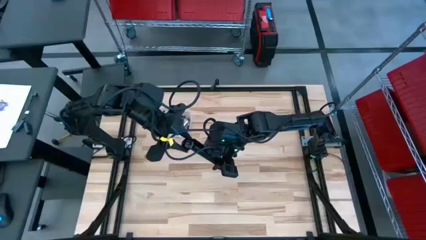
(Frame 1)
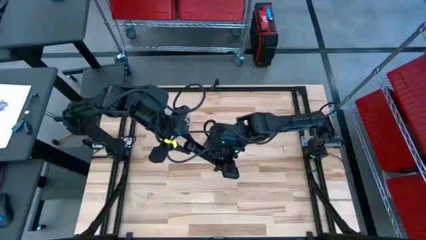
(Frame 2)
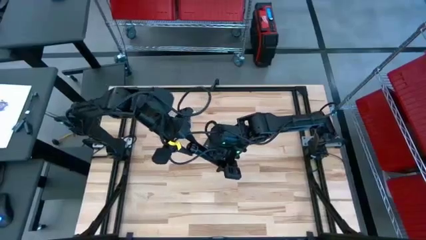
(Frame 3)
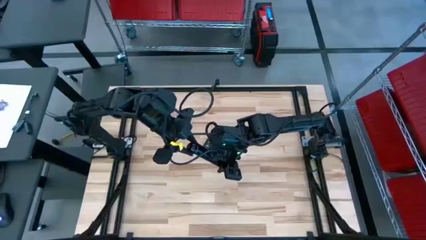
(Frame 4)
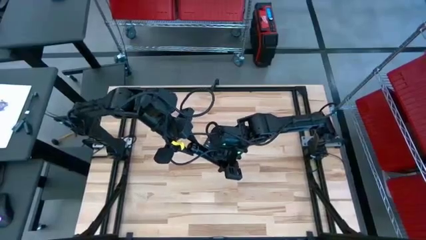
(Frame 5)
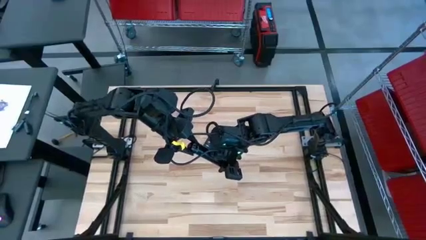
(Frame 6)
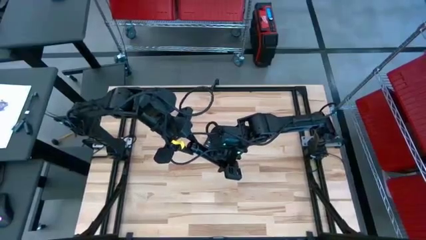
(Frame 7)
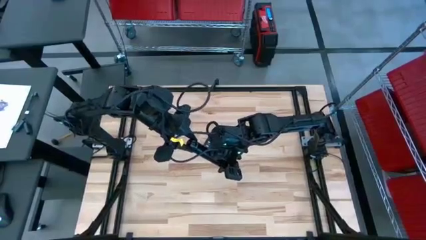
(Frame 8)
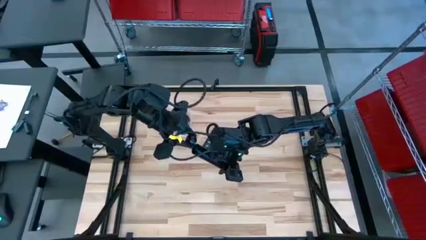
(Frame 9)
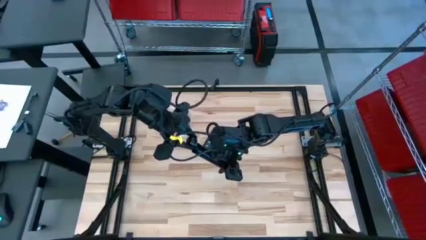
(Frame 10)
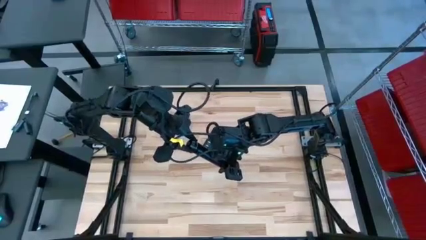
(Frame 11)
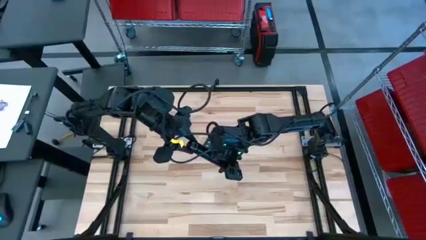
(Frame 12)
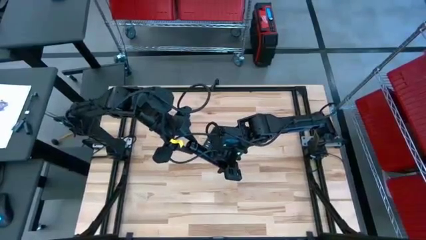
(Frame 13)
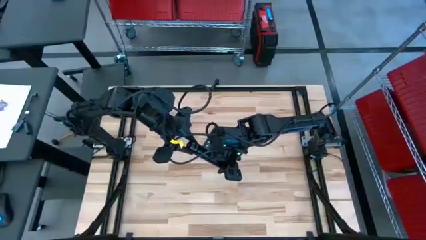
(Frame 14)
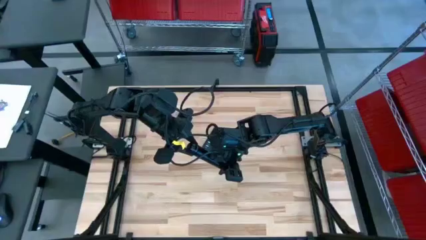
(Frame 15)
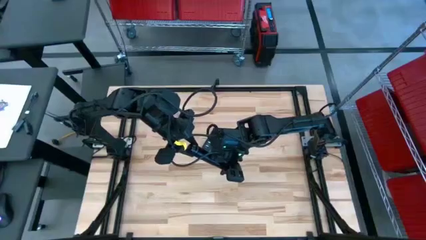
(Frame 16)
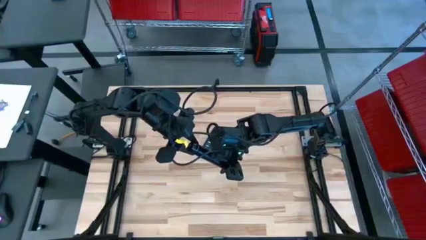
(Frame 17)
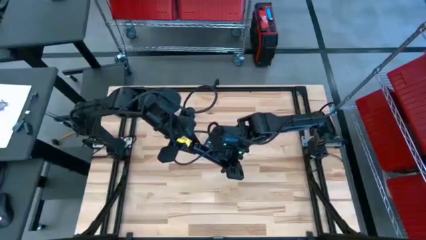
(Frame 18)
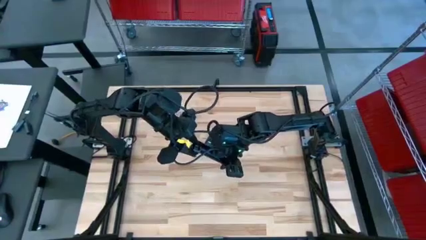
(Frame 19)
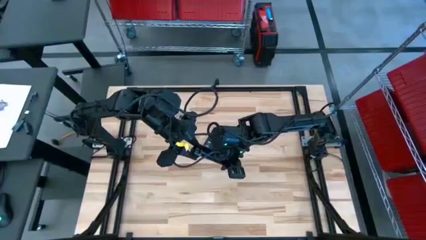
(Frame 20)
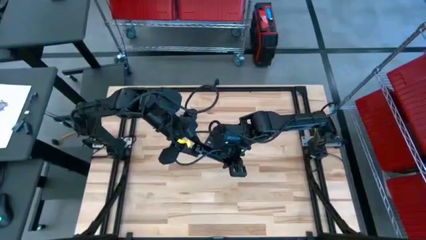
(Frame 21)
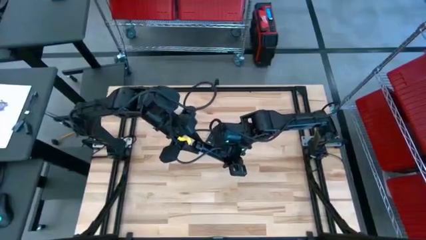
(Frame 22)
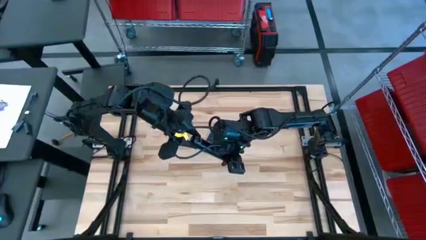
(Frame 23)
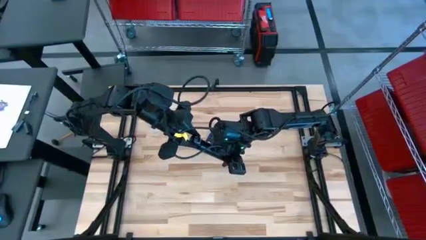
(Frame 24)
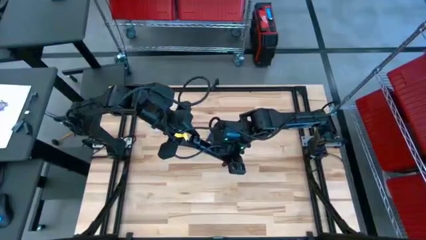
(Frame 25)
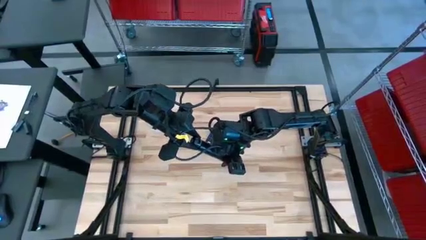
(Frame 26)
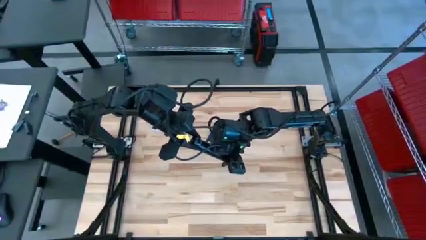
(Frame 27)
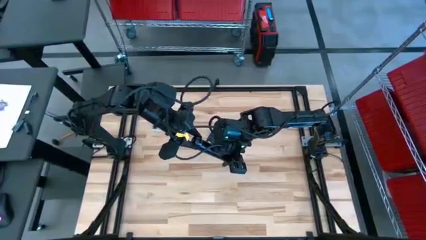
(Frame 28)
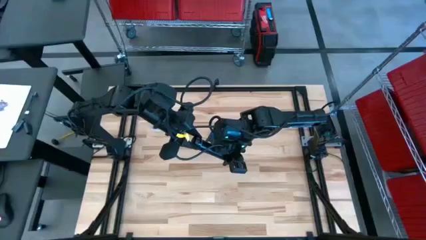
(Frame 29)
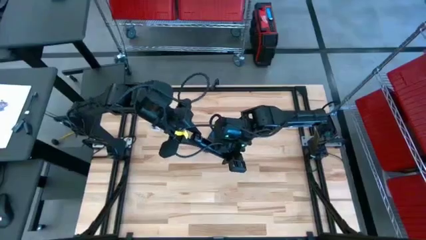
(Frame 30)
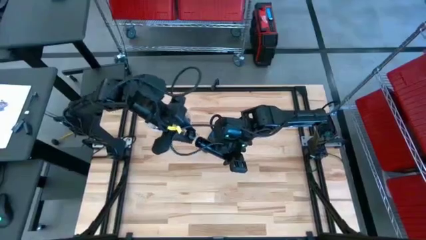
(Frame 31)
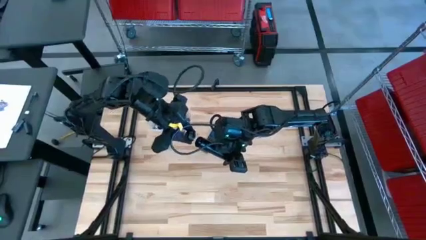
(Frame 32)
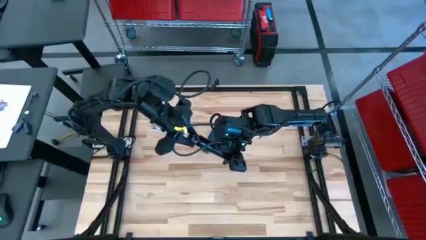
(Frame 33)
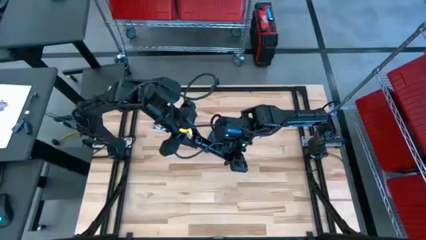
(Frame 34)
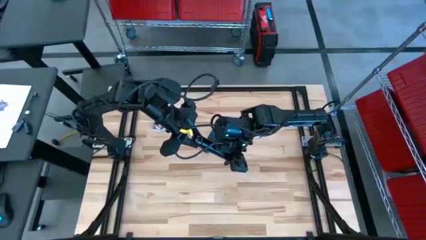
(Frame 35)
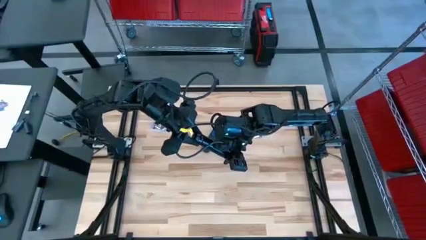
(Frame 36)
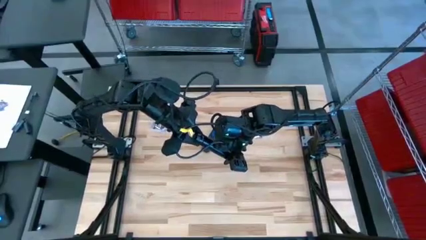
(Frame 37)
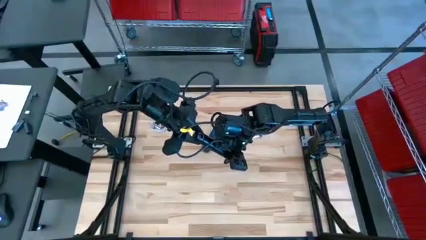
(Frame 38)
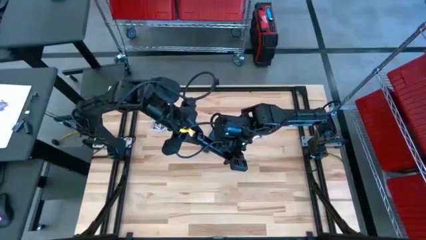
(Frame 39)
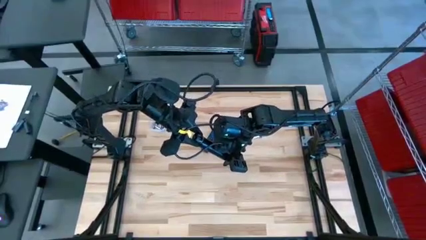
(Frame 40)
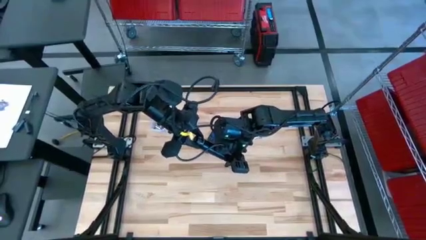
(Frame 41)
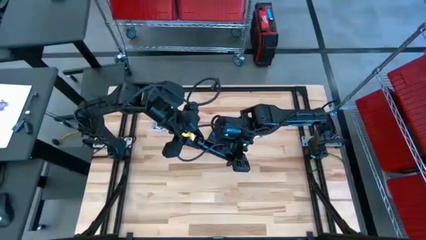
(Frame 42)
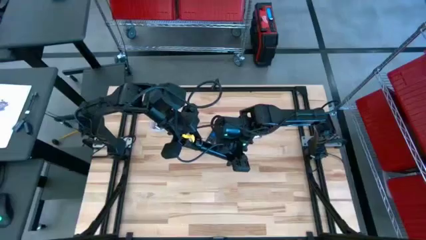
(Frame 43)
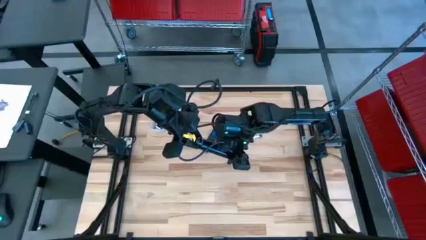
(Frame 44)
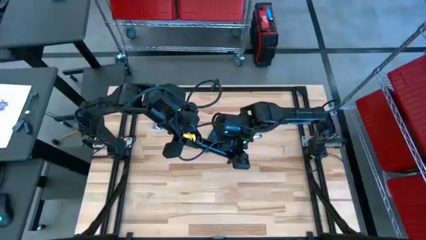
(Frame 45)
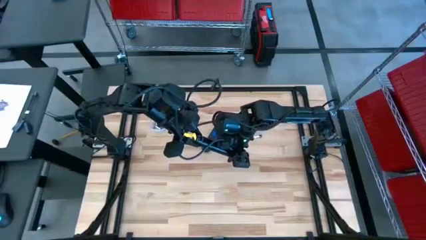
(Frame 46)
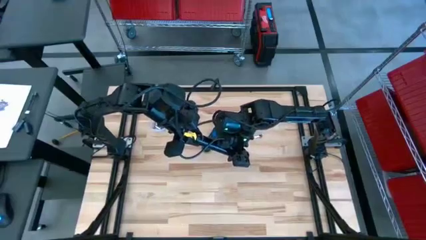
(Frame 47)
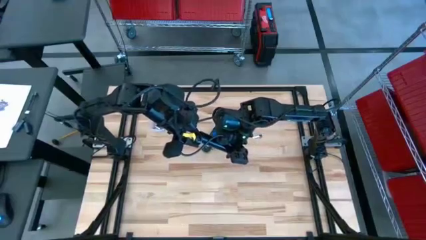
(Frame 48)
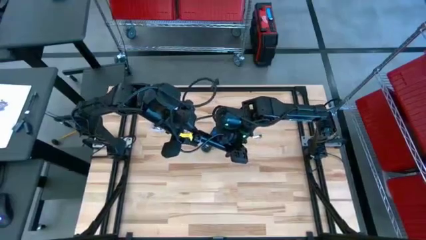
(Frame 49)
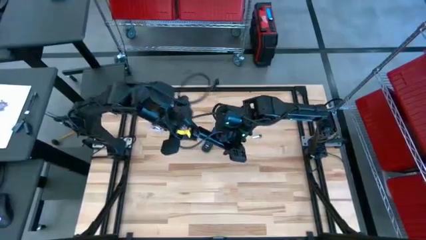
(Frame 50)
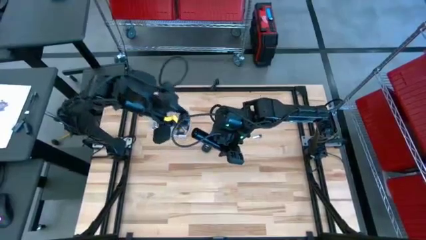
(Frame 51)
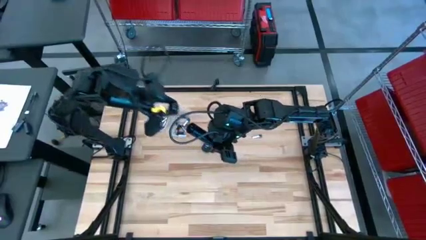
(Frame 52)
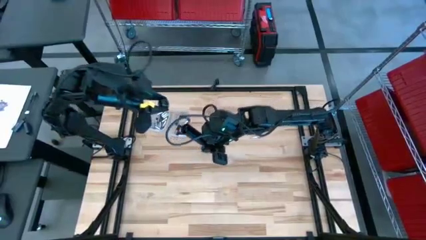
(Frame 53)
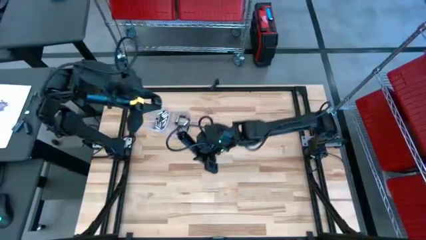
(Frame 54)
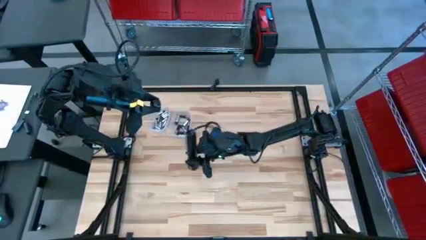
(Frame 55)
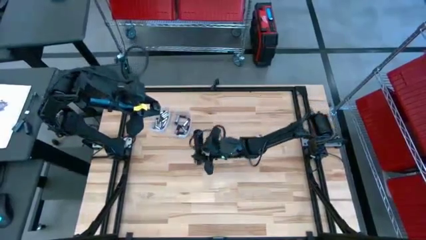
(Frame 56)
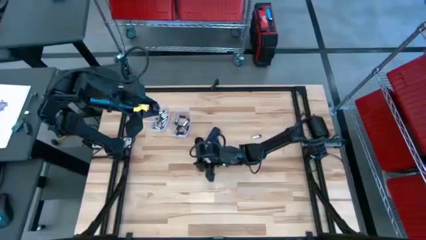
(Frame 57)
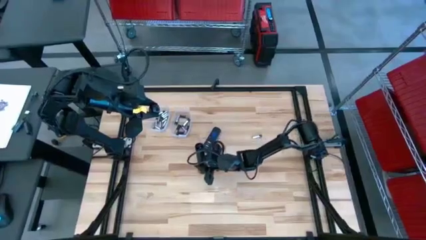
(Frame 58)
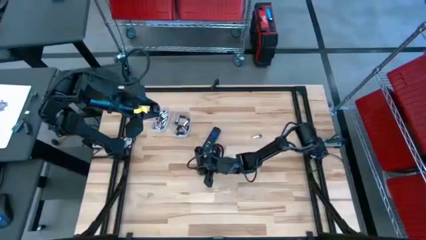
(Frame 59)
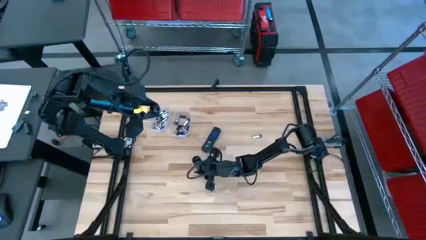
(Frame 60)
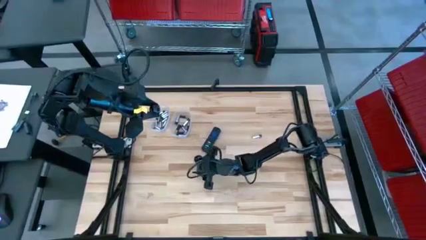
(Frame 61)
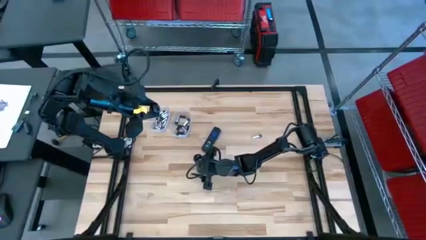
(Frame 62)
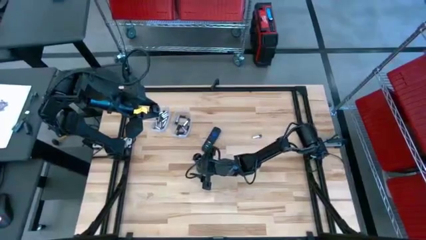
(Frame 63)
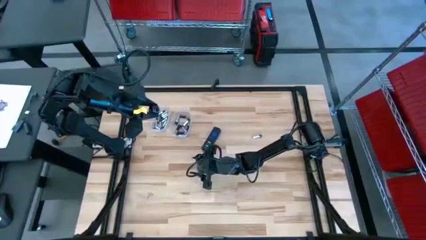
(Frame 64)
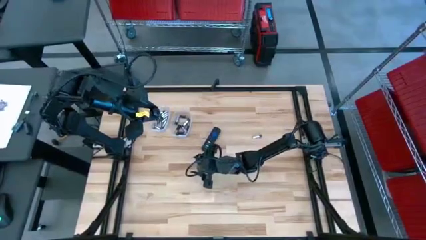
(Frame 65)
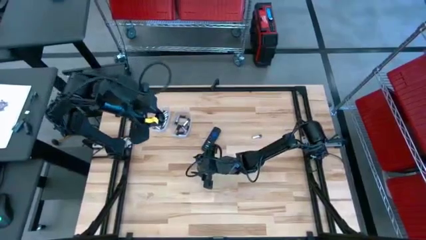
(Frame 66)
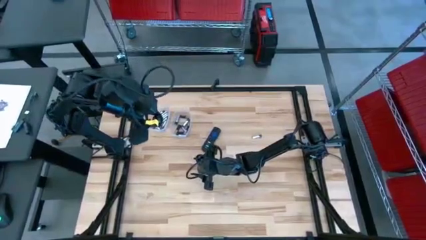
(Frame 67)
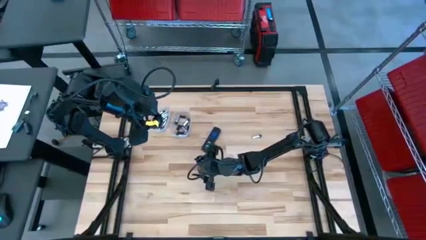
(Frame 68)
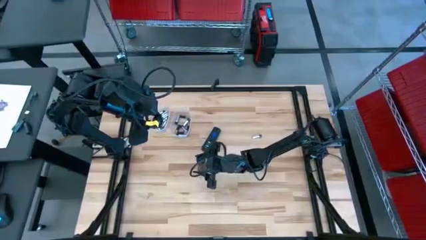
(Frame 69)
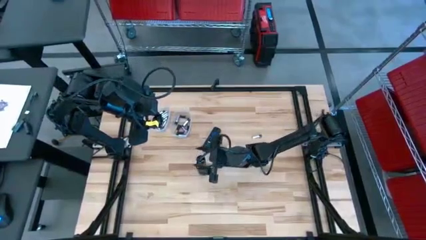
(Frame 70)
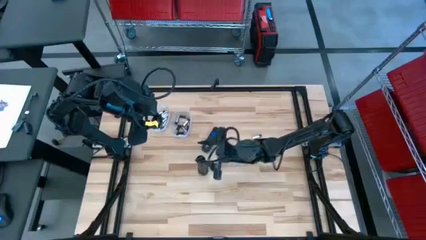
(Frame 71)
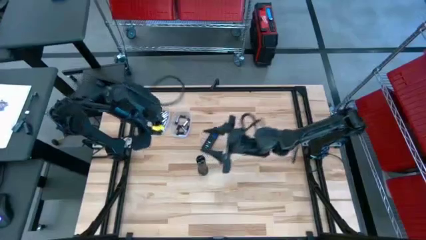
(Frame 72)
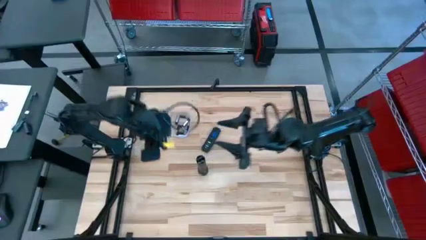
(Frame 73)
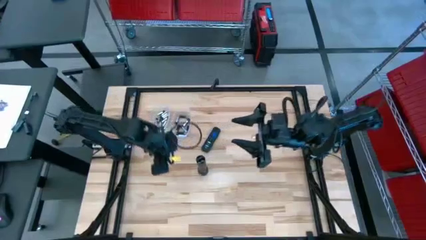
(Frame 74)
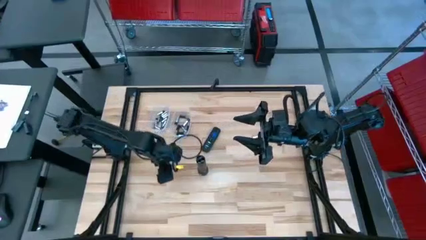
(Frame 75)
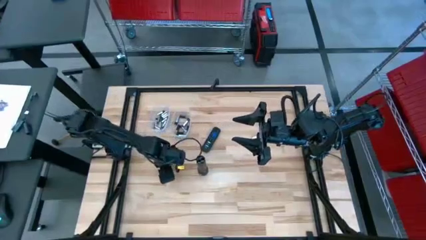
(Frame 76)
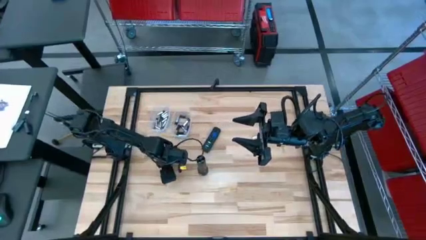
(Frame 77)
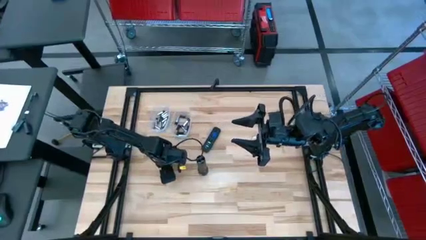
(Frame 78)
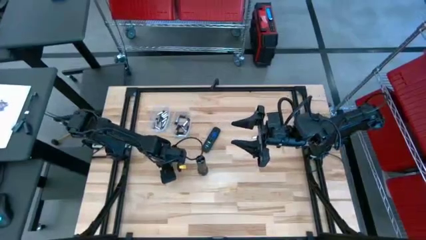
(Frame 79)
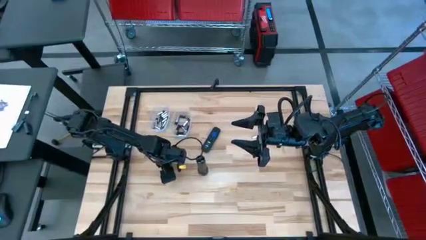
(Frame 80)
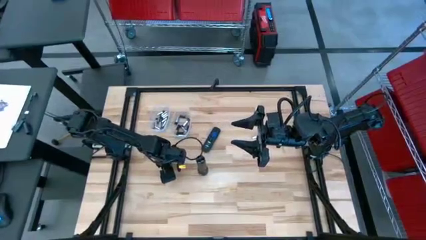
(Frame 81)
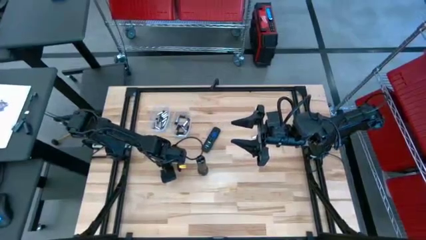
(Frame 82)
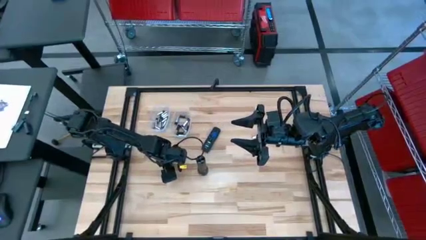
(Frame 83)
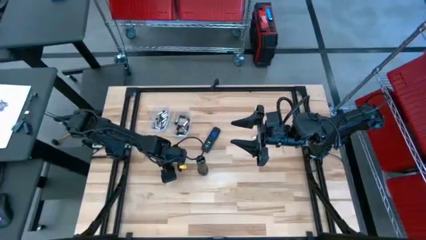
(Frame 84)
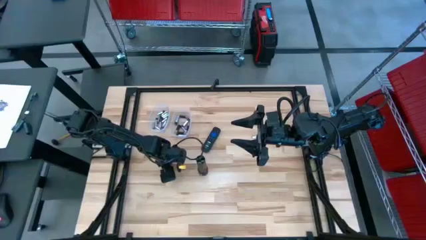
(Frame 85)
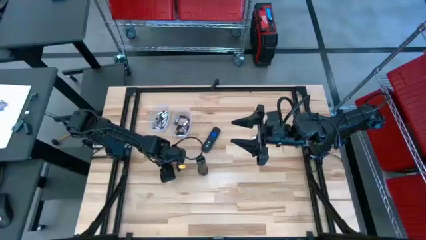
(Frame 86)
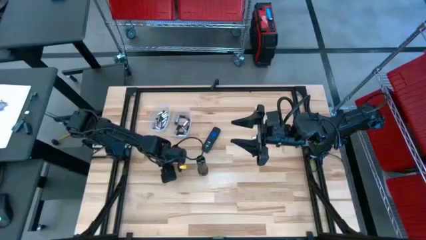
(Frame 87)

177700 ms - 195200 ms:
Task: Insert battery
Close the flashlight battery compartment
